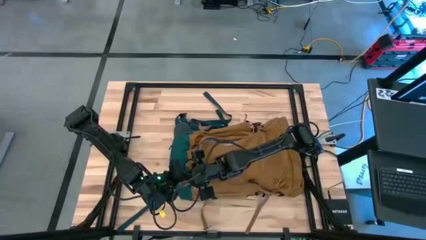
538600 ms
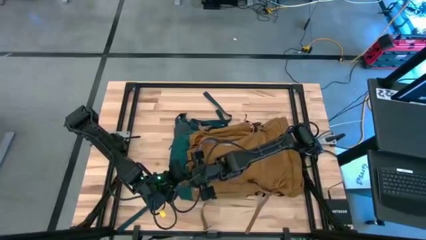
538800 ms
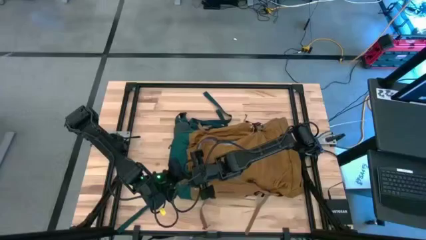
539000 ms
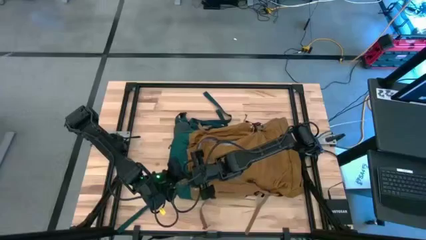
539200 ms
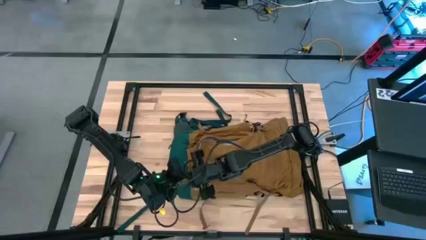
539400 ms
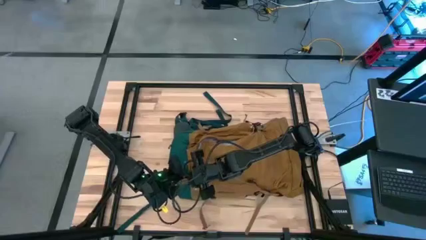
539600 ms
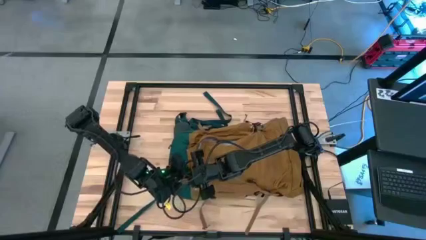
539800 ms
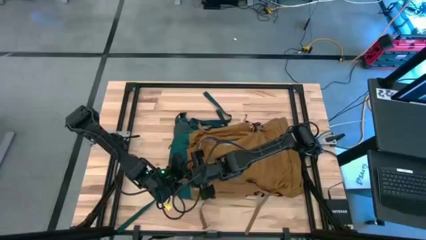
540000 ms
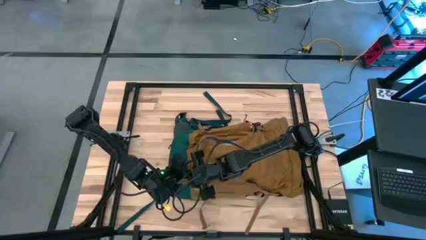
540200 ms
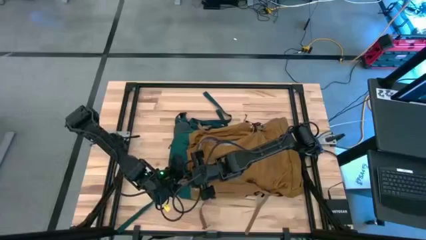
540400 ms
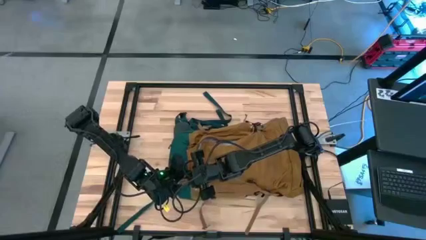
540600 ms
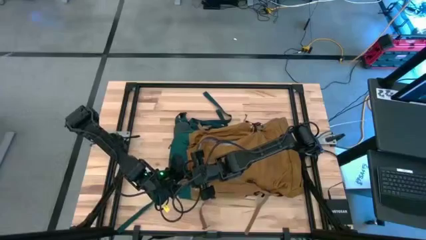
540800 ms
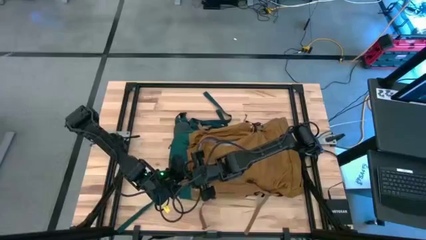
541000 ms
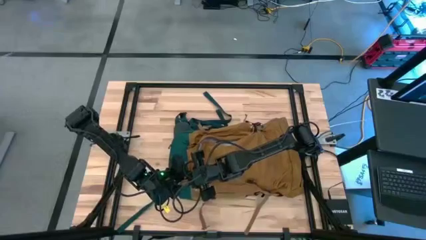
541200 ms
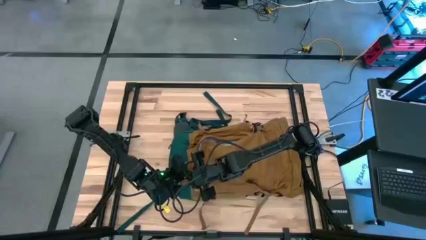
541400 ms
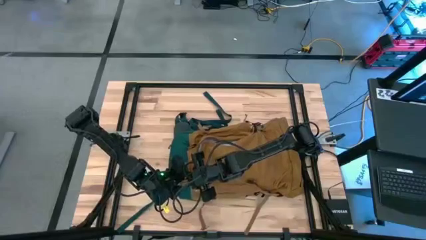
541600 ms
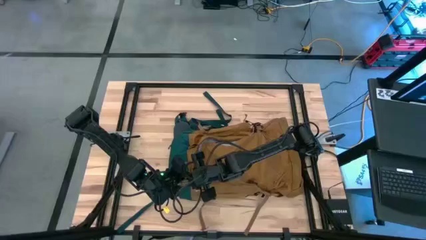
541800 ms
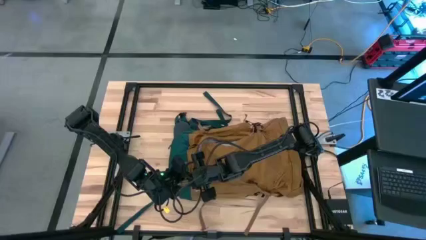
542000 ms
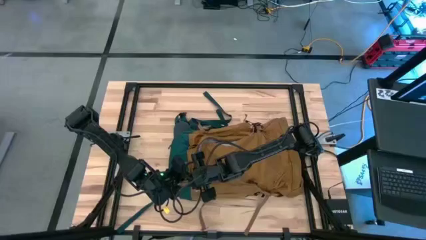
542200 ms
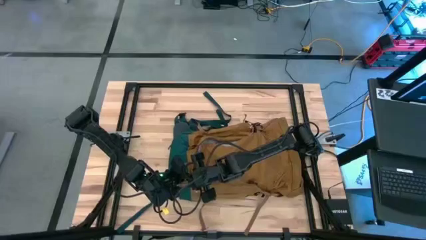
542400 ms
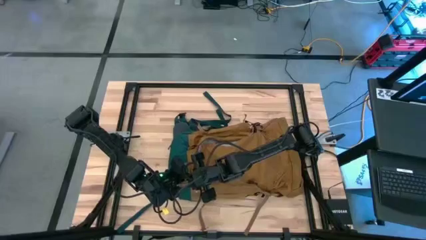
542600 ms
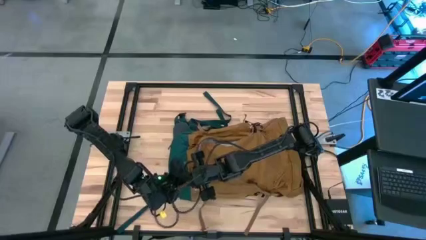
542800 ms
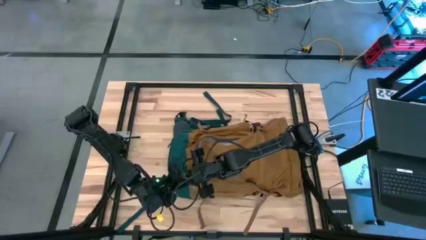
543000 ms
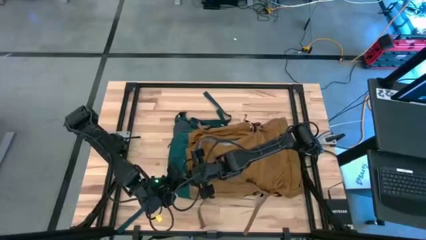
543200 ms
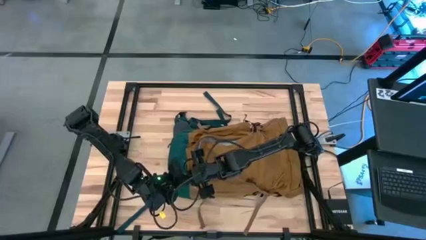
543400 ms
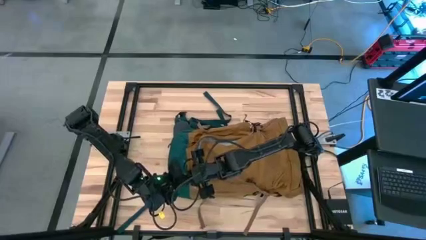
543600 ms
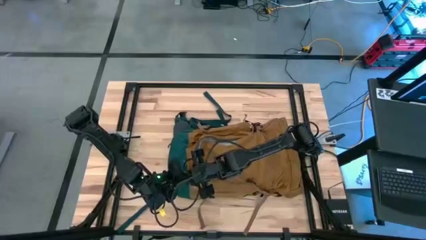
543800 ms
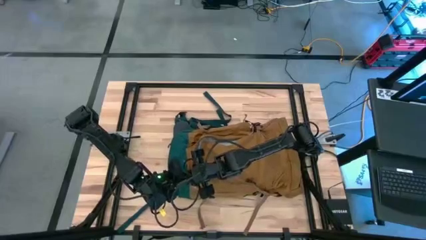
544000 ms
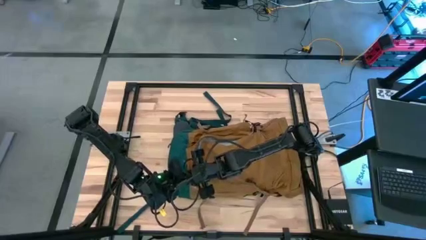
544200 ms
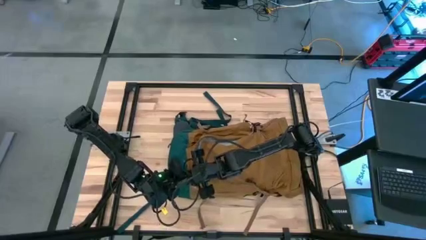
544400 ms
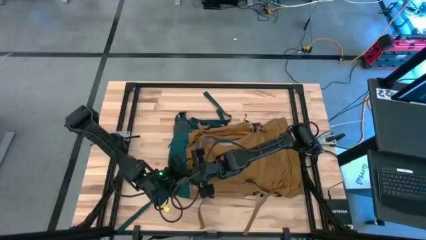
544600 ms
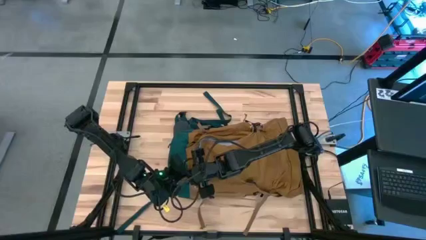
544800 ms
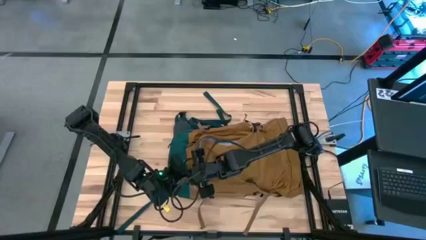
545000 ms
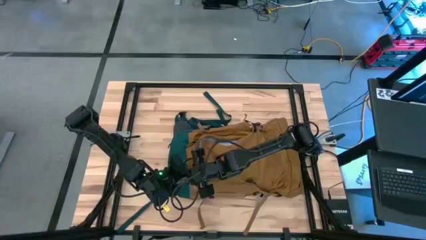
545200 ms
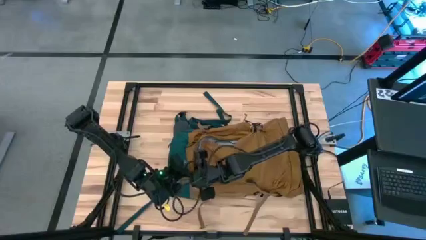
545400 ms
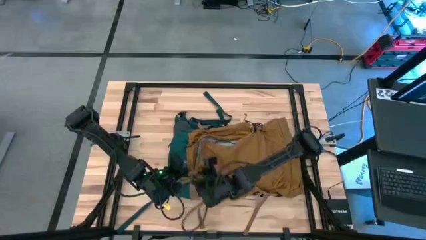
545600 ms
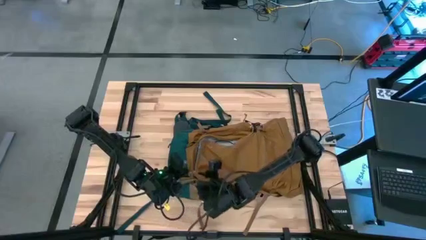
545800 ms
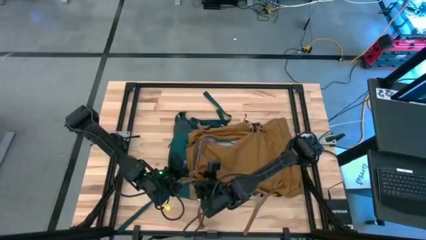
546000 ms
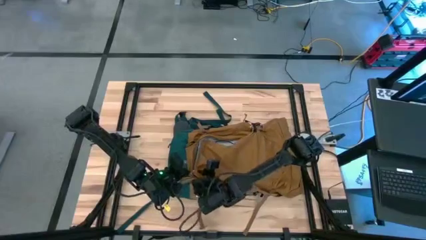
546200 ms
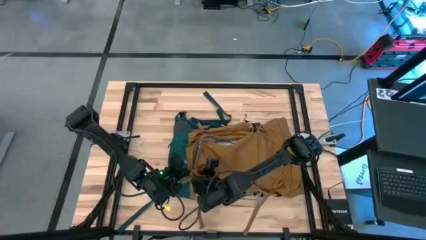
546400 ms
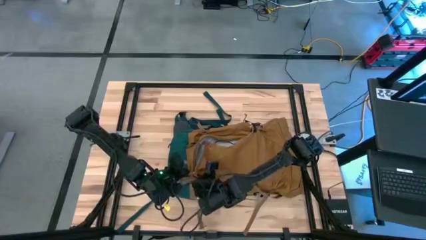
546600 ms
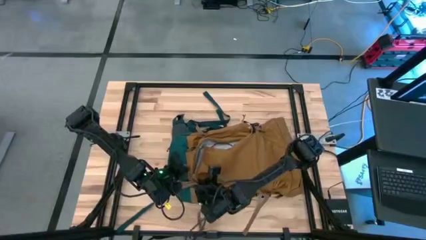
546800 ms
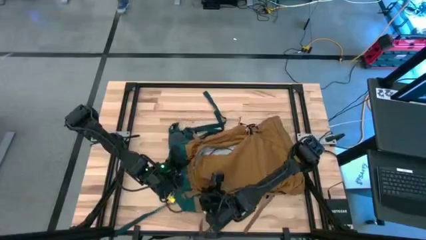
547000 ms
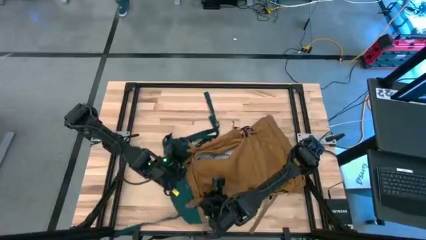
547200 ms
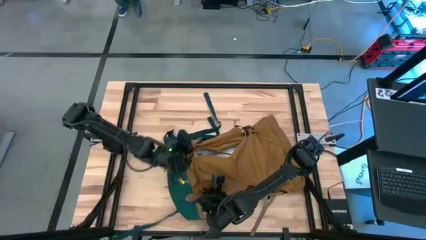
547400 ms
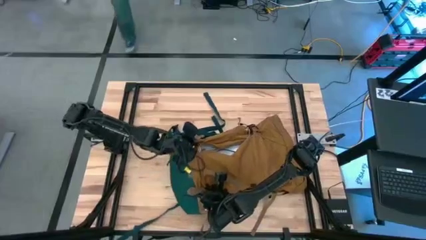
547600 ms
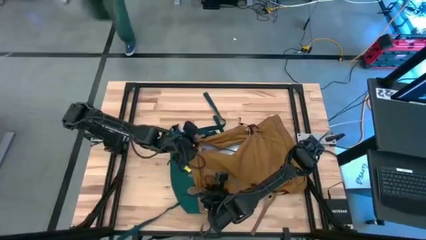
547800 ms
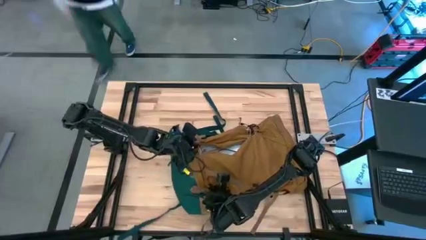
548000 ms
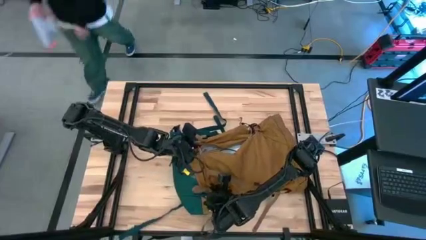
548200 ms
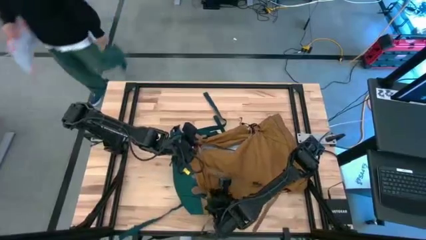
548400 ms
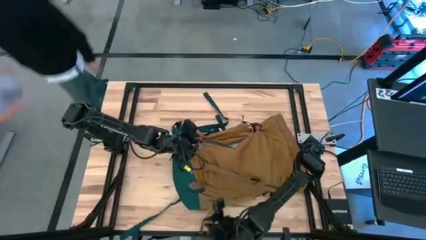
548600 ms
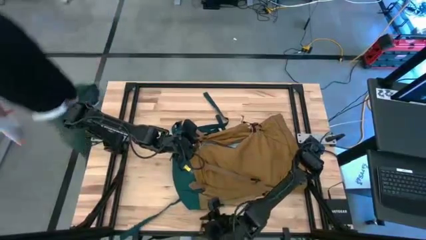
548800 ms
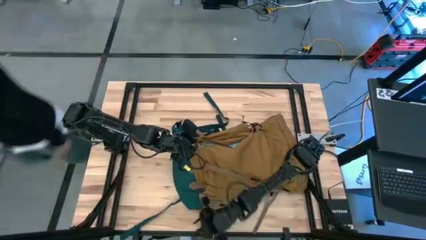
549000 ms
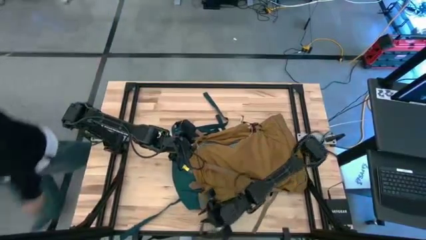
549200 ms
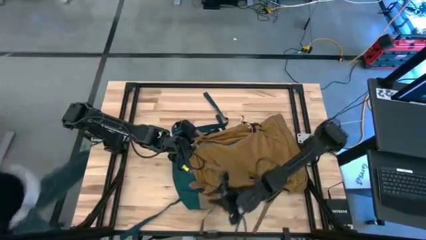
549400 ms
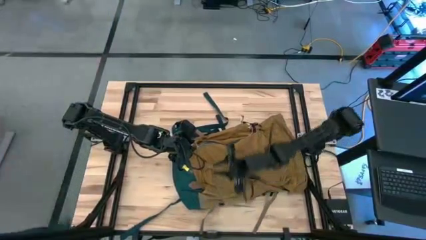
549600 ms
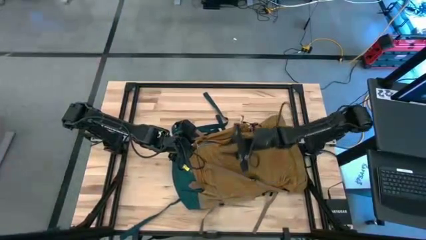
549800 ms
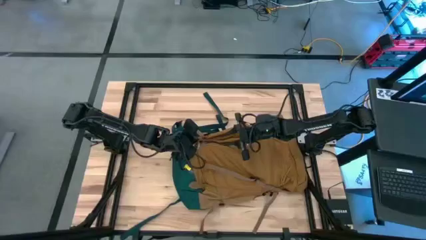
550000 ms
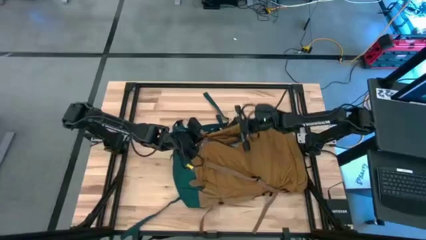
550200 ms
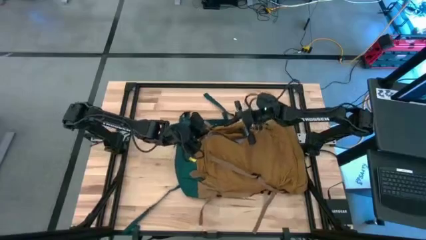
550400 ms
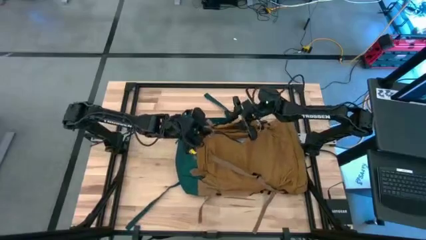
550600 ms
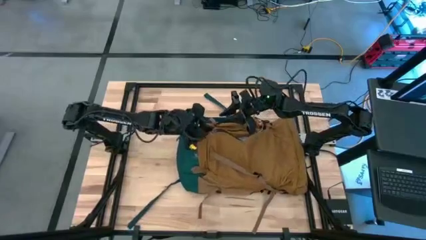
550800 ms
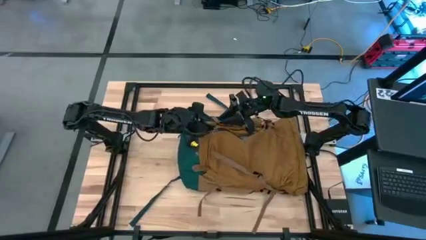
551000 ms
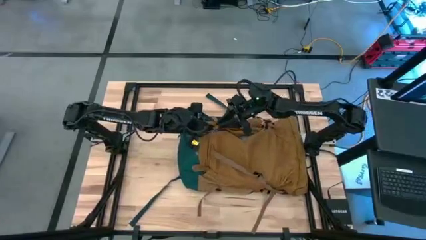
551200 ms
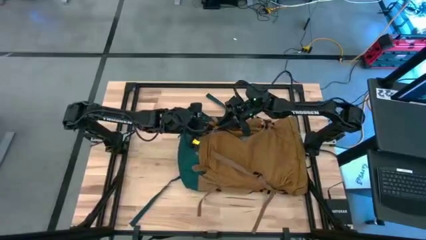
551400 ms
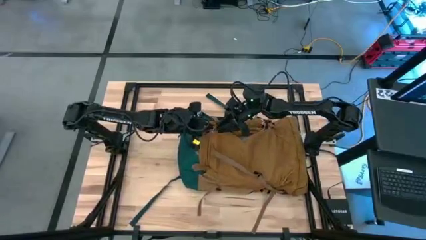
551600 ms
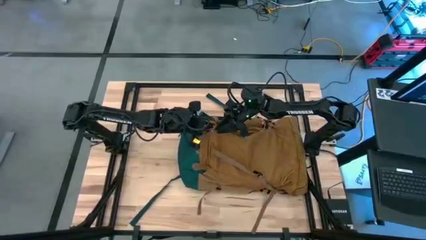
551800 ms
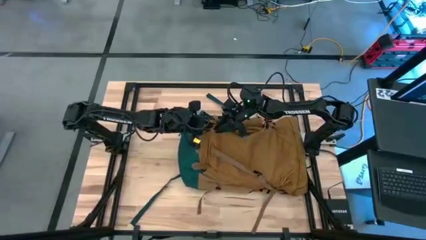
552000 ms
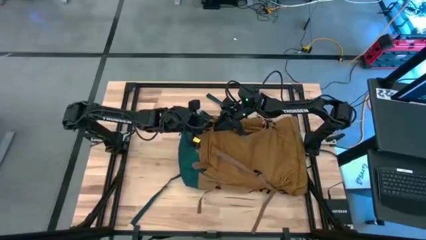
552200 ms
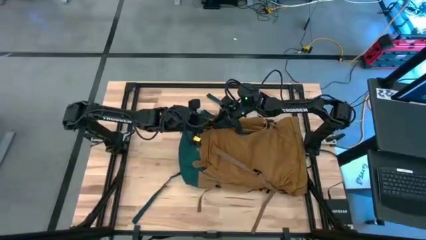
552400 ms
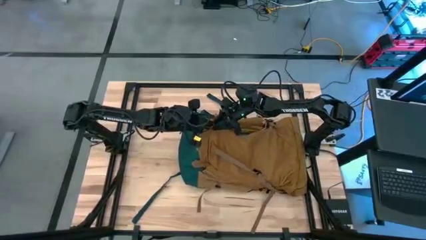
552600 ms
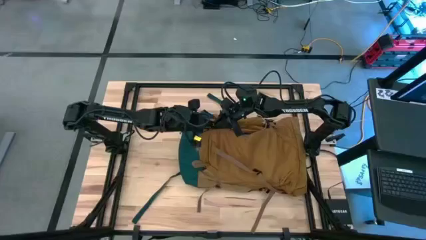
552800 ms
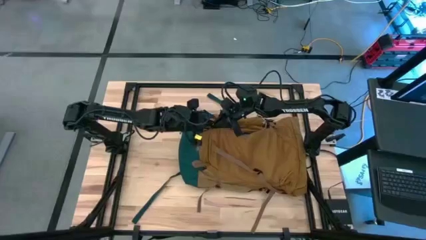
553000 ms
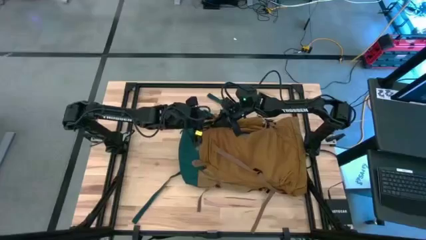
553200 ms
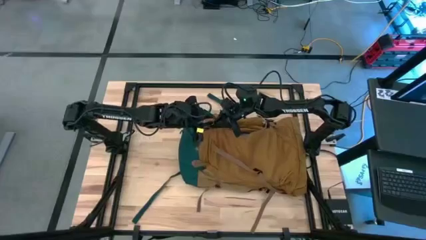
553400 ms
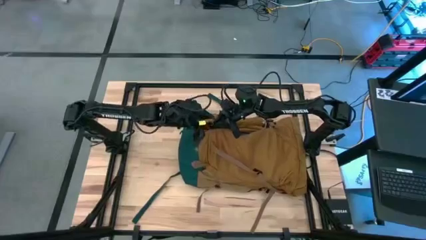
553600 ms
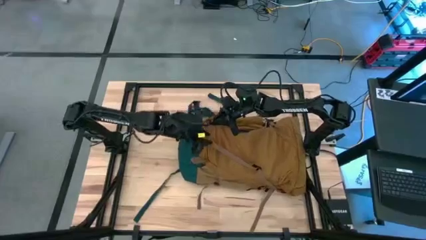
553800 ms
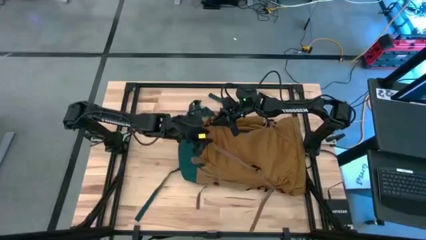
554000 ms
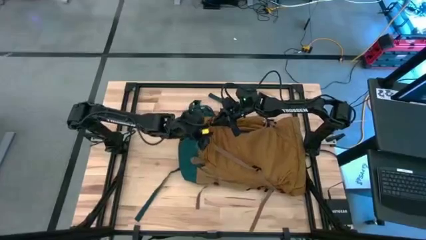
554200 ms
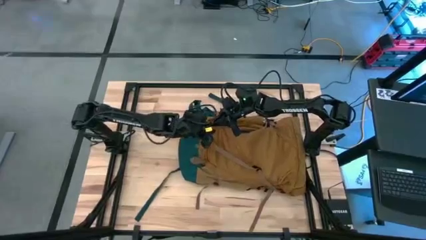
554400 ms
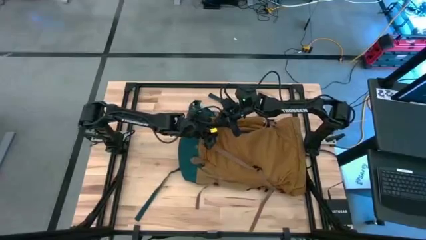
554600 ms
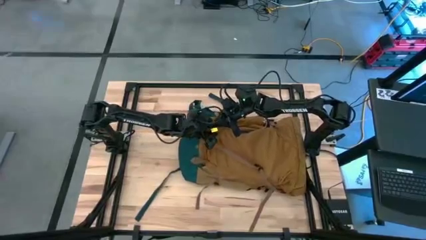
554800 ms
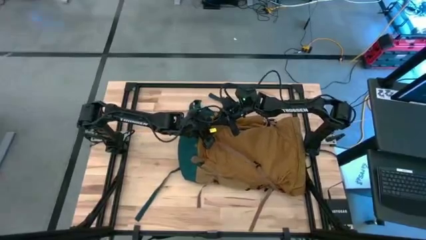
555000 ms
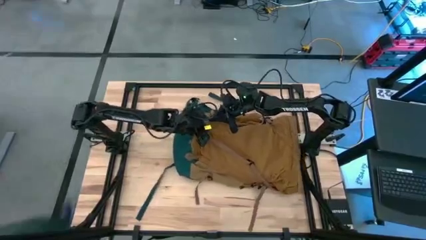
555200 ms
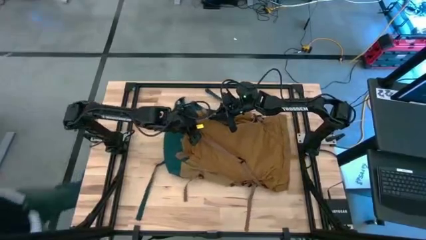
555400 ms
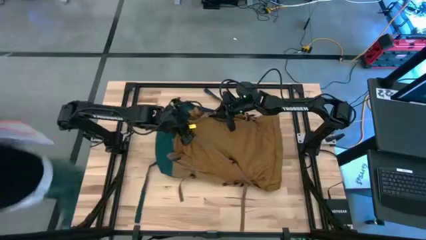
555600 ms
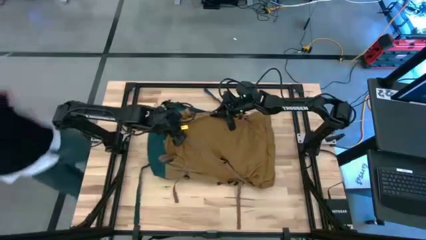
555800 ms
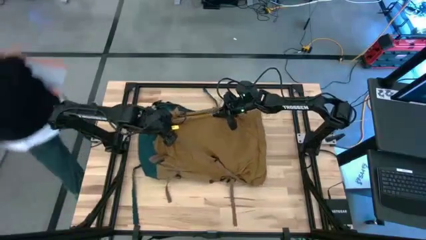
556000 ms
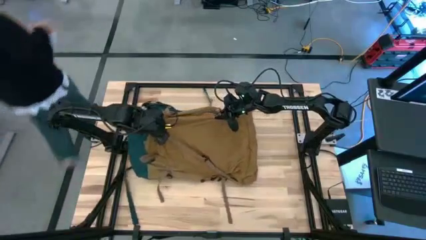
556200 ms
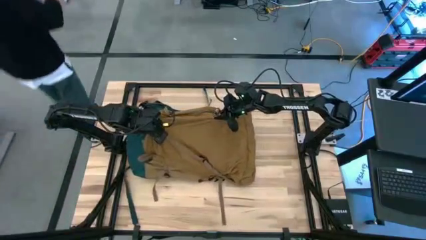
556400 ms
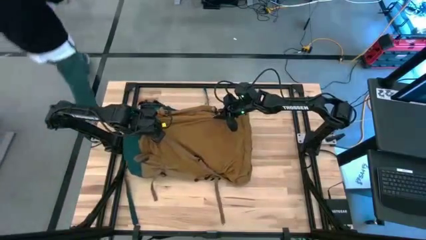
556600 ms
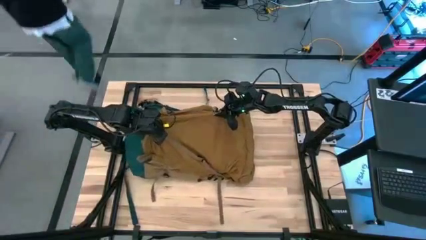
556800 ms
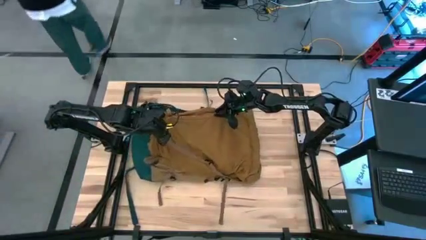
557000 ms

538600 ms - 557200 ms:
Task: Unpack backpack
Close the brown backpack
